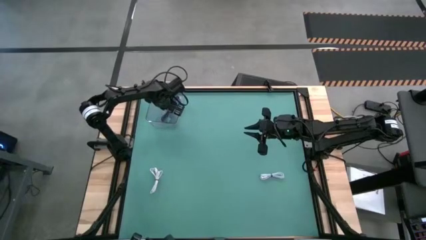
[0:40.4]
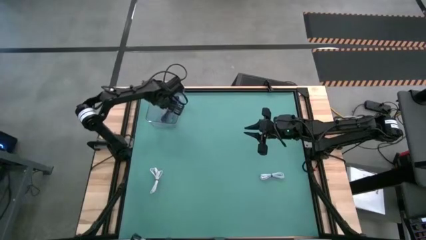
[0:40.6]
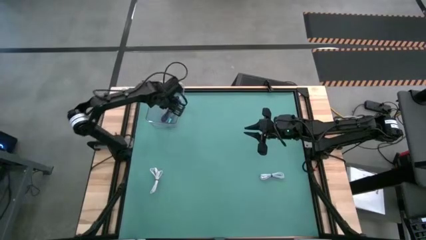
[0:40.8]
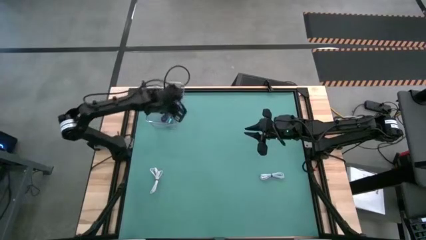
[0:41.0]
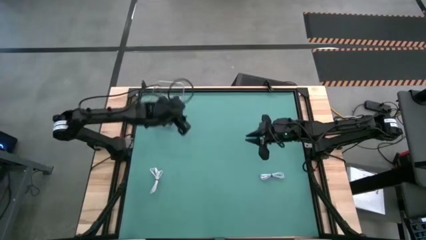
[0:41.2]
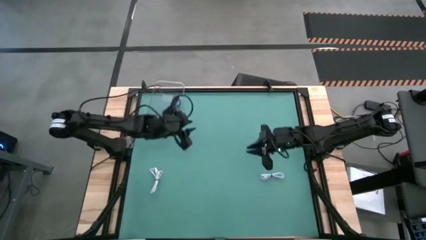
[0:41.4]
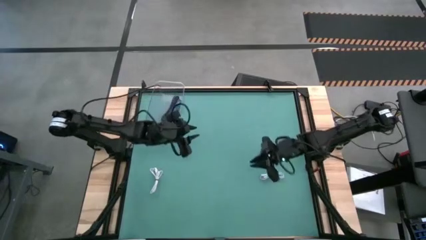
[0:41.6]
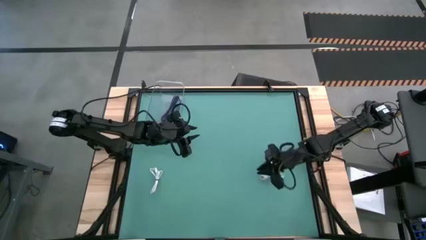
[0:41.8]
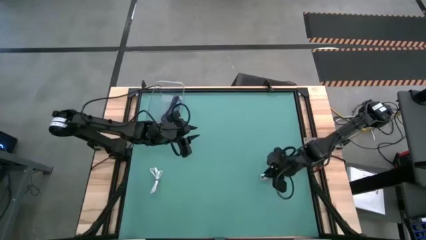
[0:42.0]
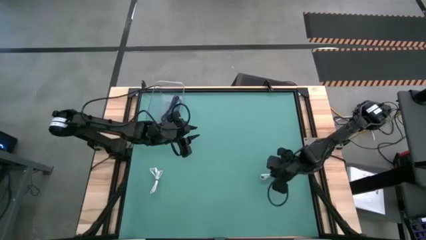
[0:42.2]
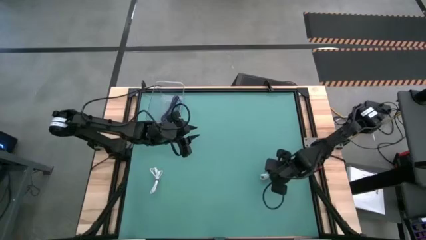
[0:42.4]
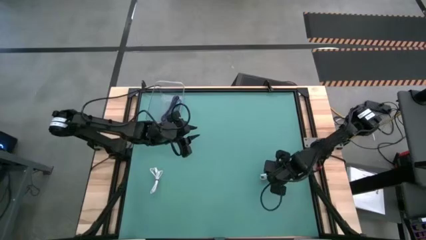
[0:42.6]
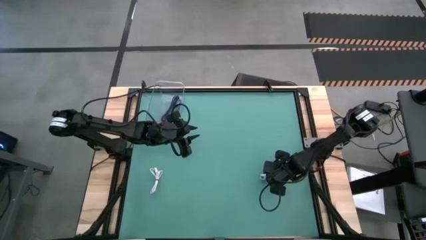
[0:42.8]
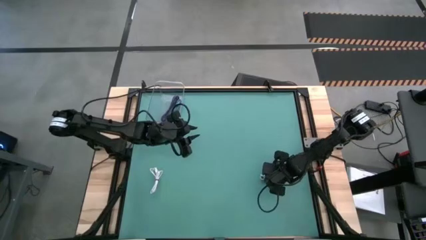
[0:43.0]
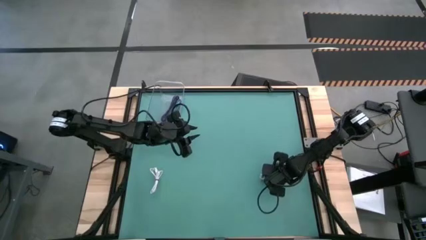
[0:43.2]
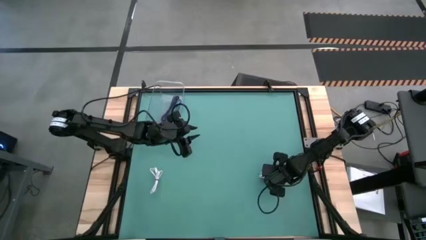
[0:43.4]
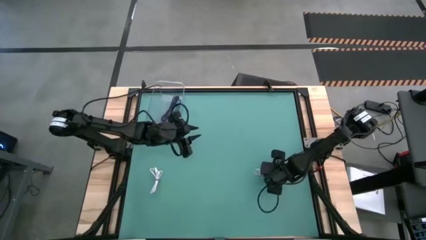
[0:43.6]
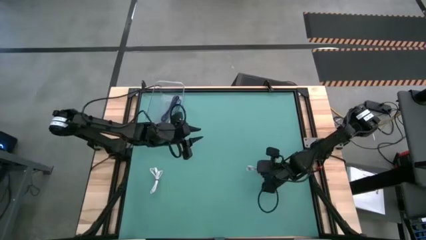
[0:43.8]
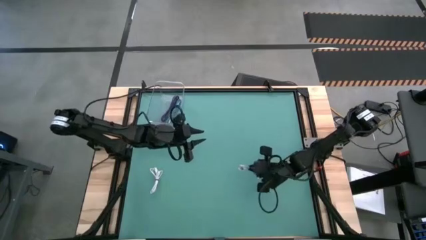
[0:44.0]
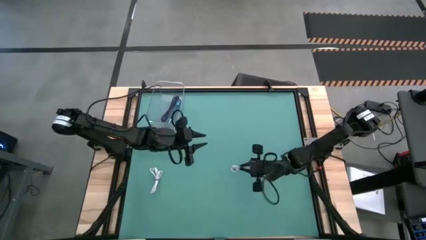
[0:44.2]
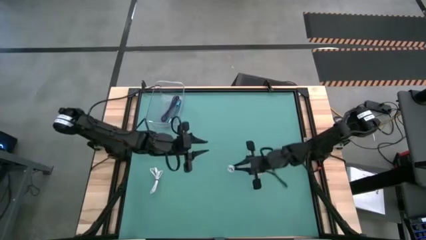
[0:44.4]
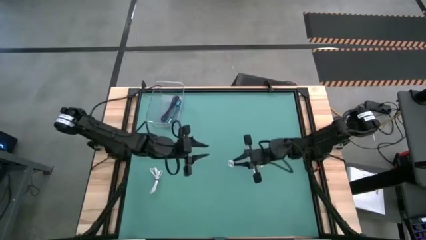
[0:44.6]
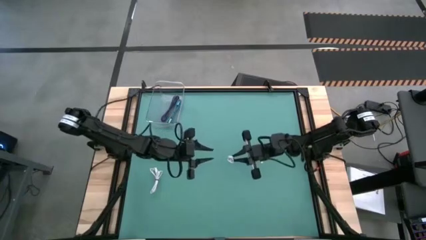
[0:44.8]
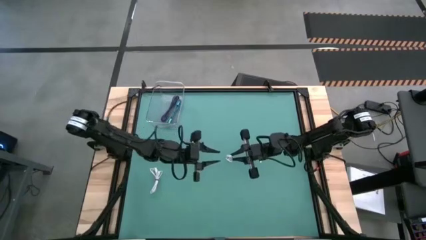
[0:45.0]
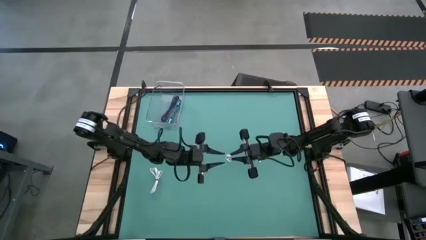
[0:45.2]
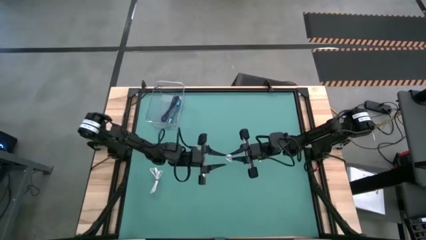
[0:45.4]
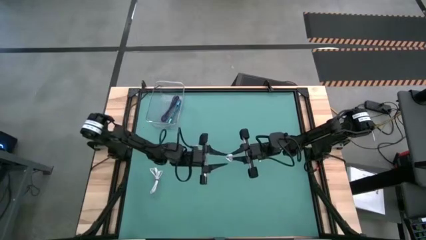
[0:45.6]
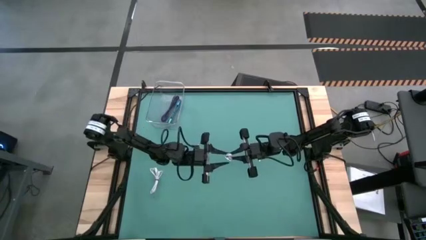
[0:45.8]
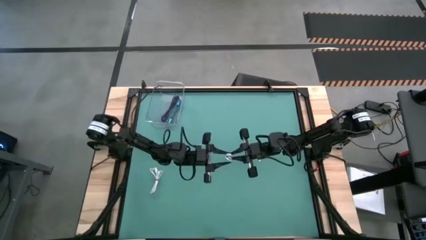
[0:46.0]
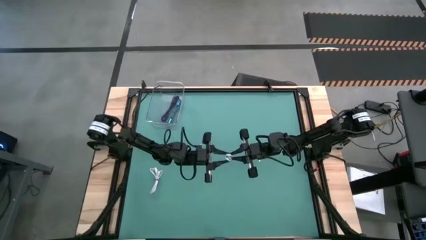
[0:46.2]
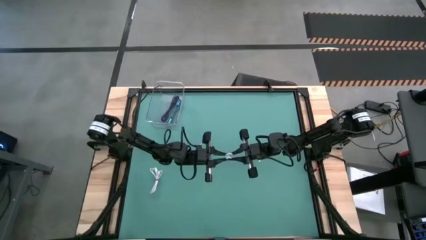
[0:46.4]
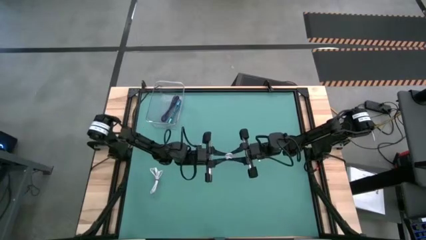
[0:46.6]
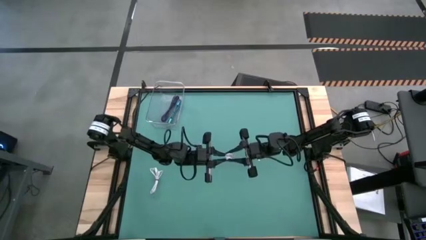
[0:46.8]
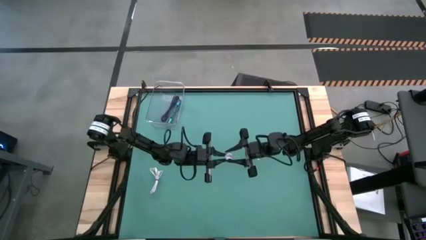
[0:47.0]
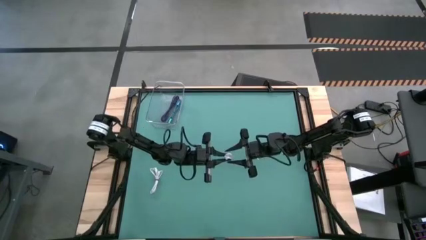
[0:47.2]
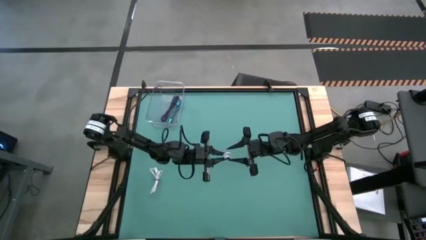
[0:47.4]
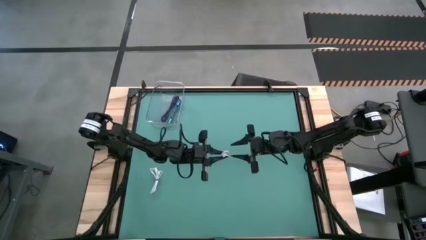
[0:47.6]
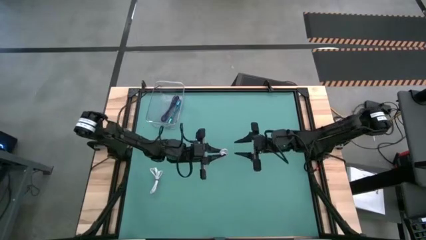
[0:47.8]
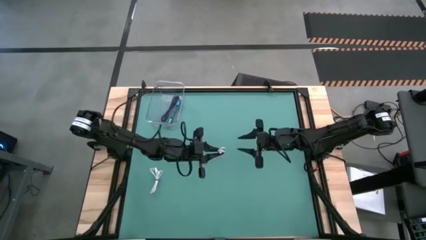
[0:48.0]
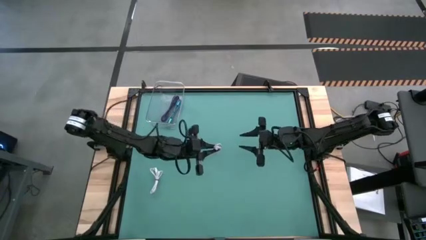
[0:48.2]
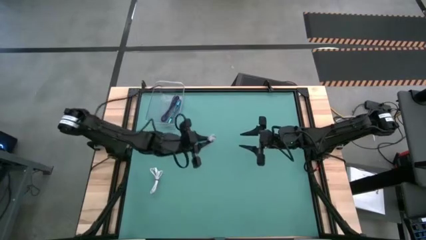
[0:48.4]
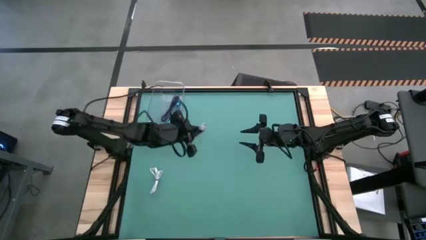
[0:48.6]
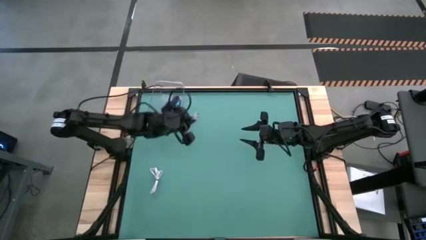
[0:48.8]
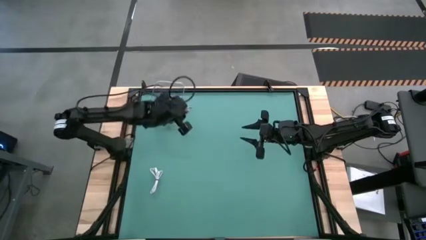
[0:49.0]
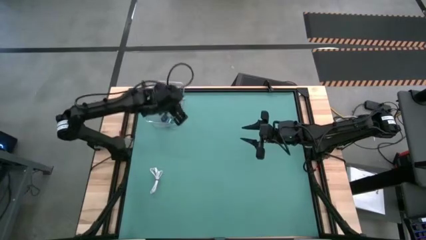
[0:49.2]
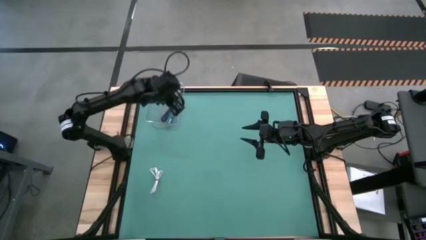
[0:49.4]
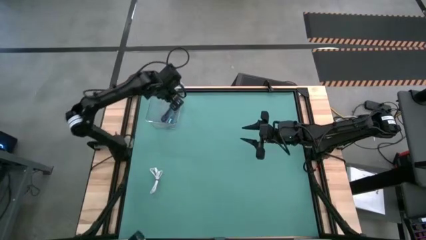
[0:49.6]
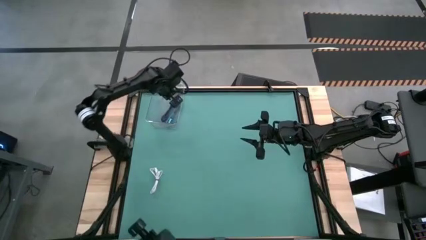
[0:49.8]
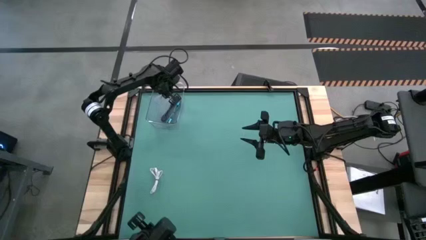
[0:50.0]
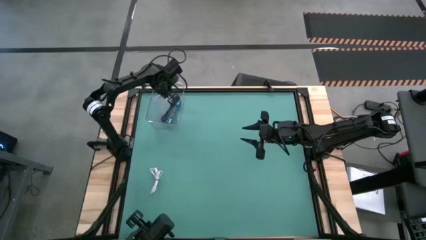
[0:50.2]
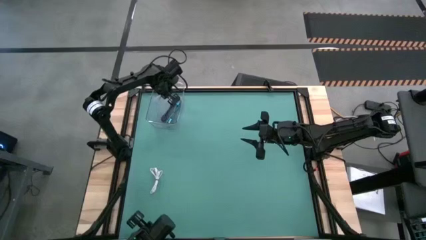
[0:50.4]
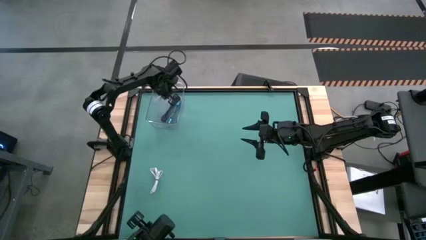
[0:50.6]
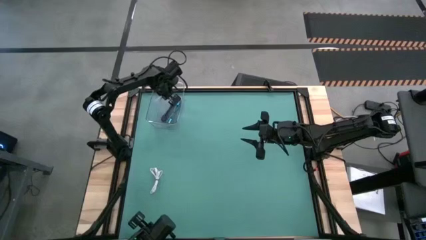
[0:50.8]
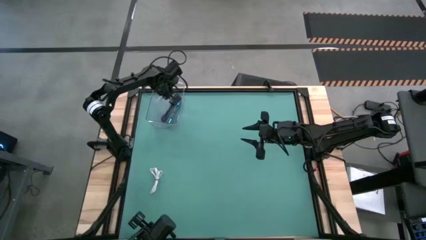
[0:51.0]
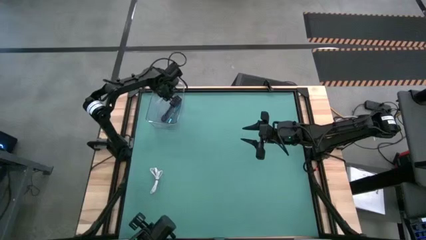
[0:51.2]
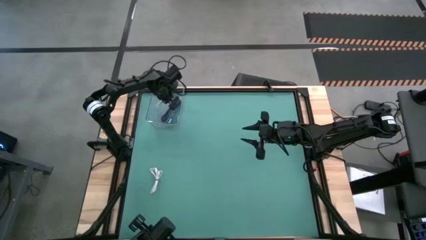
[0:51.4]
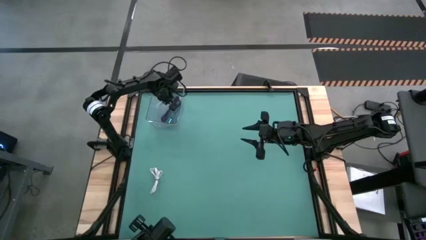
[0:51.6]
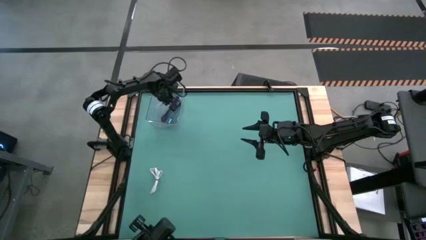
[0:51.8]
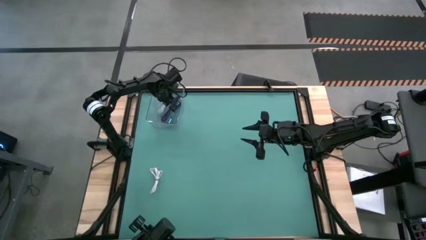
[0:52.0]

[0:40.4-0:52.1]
Task: Pick and place USB-C Cables
Put the right white charger cable into the transparent bin
